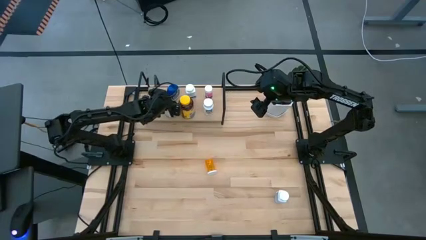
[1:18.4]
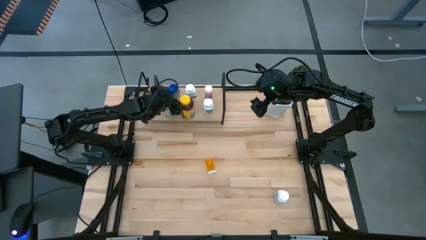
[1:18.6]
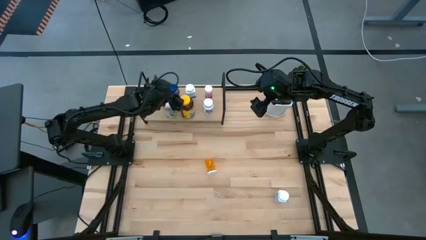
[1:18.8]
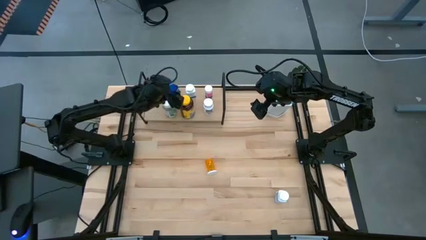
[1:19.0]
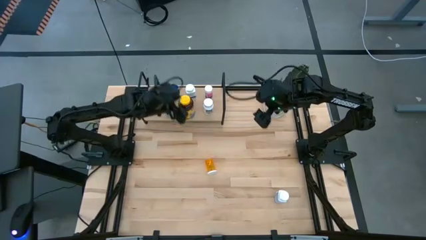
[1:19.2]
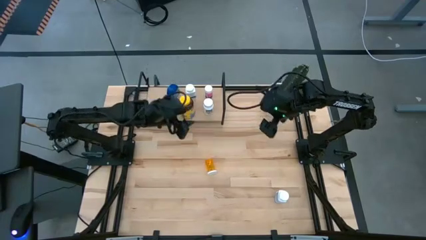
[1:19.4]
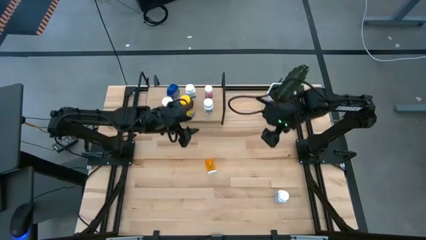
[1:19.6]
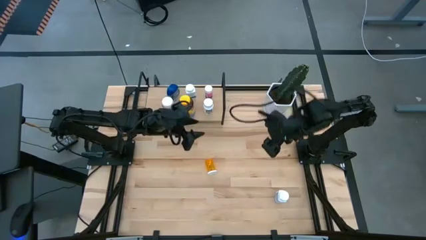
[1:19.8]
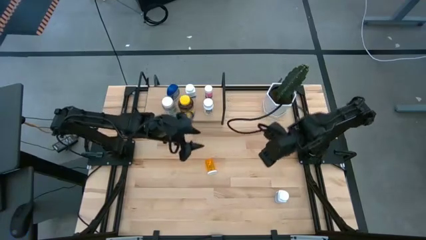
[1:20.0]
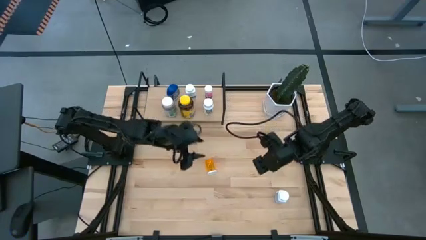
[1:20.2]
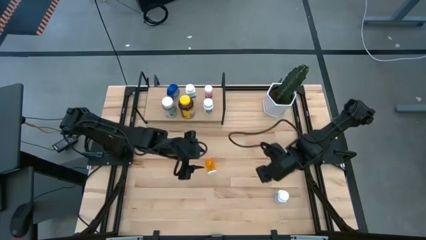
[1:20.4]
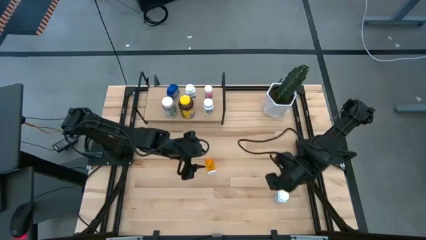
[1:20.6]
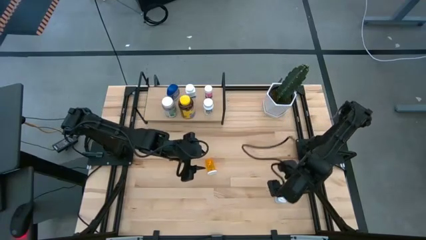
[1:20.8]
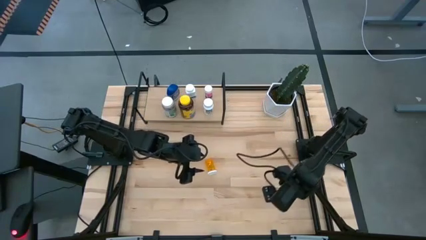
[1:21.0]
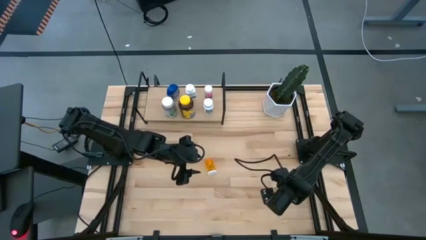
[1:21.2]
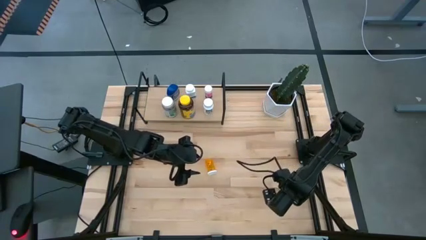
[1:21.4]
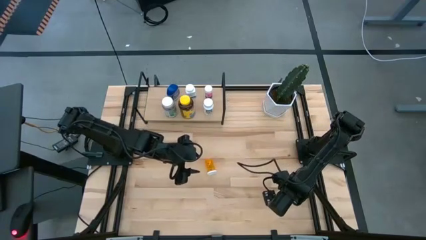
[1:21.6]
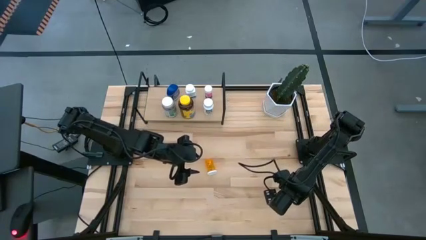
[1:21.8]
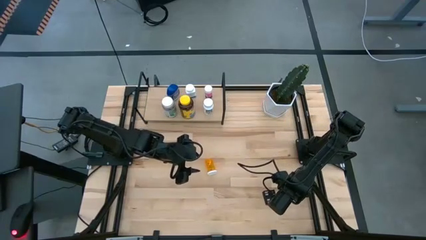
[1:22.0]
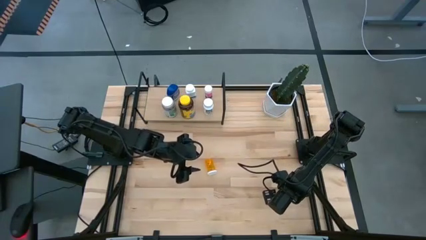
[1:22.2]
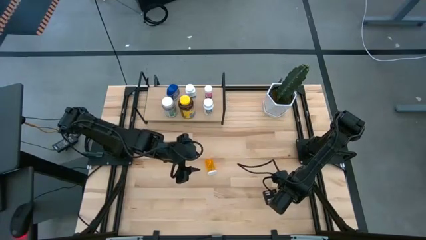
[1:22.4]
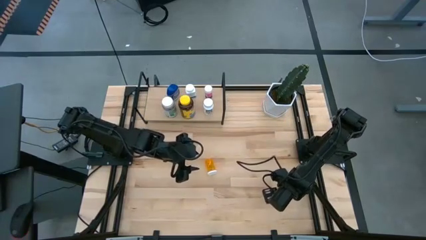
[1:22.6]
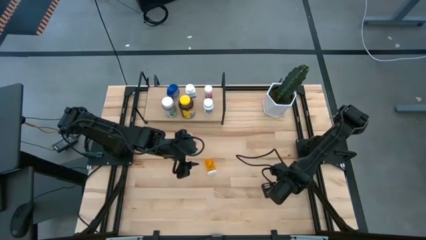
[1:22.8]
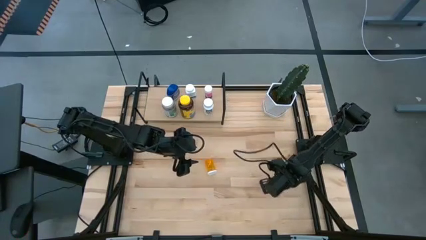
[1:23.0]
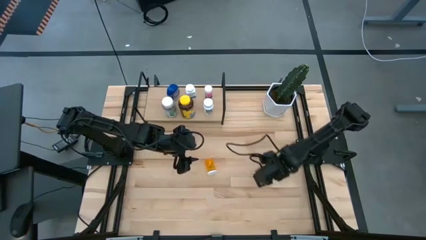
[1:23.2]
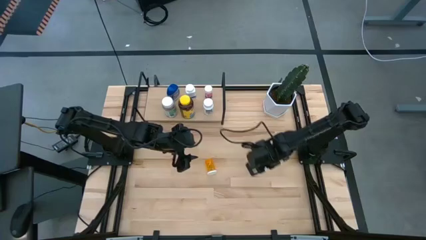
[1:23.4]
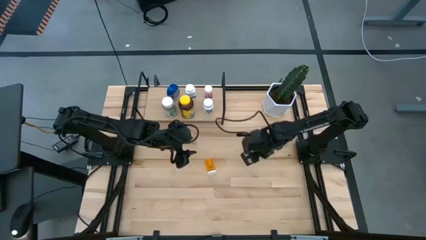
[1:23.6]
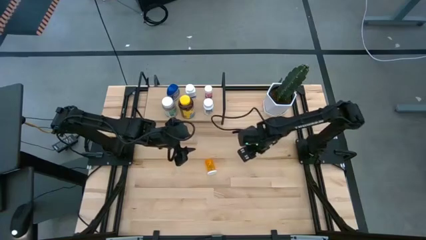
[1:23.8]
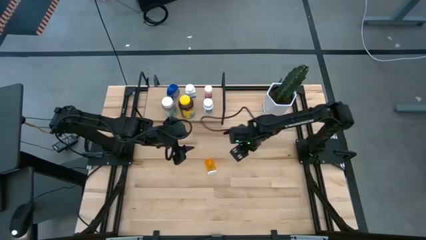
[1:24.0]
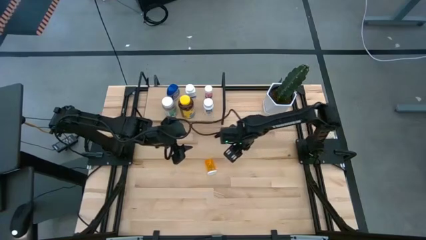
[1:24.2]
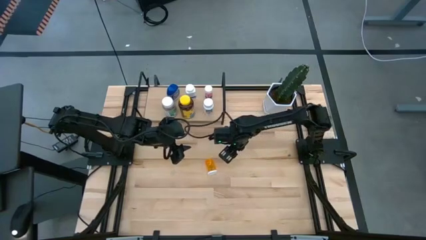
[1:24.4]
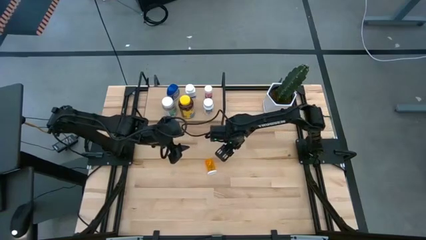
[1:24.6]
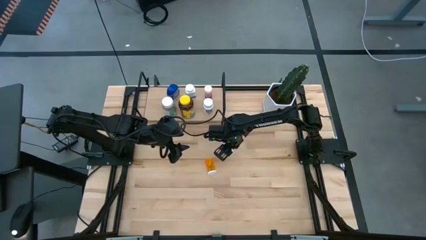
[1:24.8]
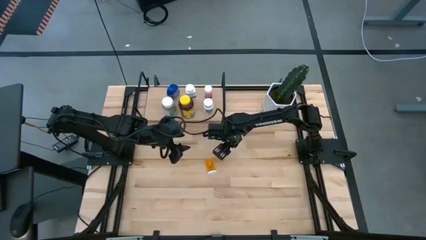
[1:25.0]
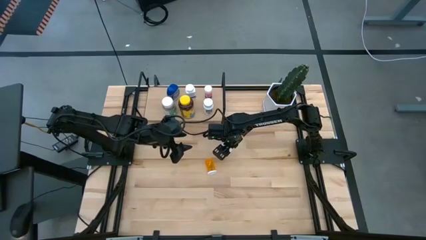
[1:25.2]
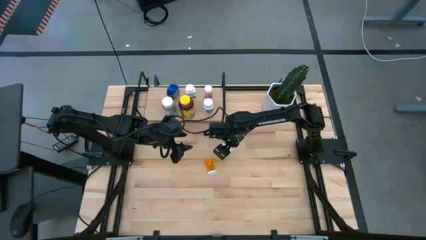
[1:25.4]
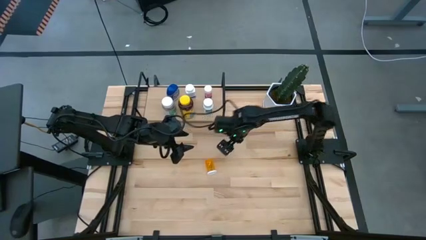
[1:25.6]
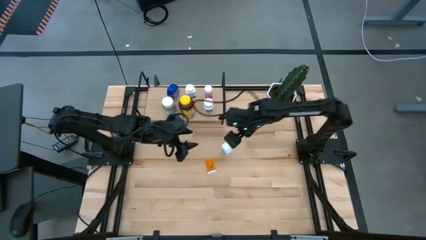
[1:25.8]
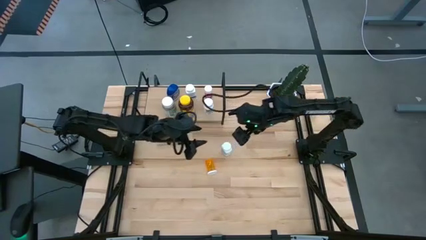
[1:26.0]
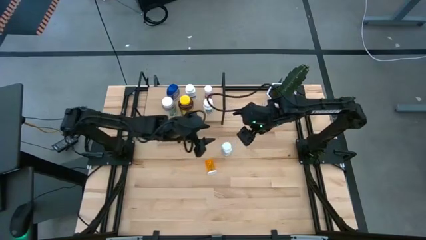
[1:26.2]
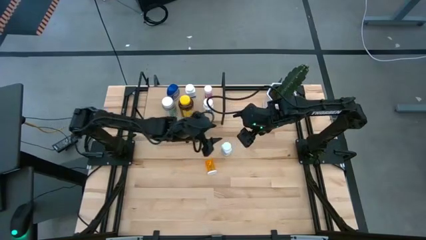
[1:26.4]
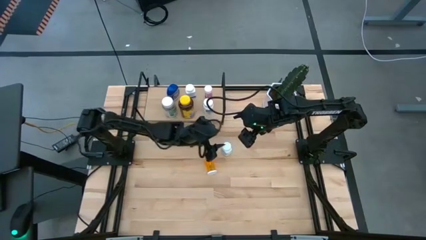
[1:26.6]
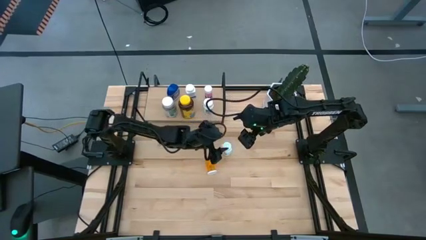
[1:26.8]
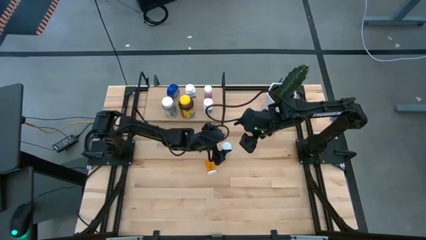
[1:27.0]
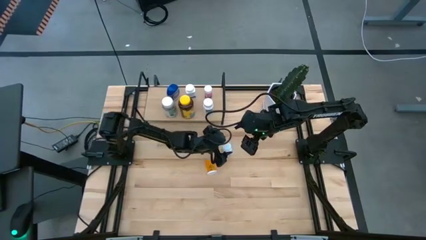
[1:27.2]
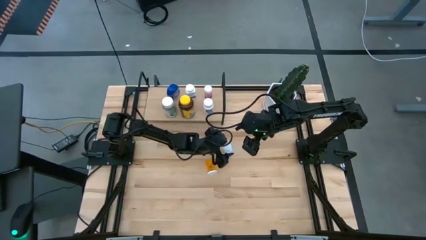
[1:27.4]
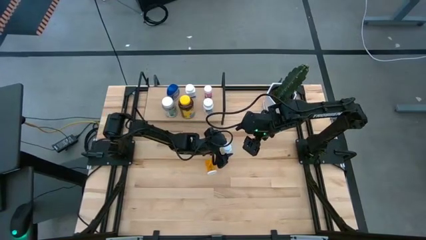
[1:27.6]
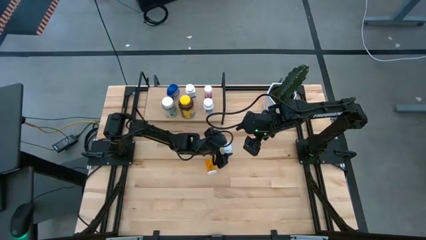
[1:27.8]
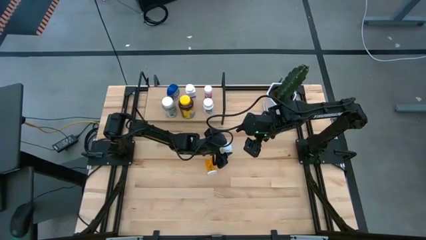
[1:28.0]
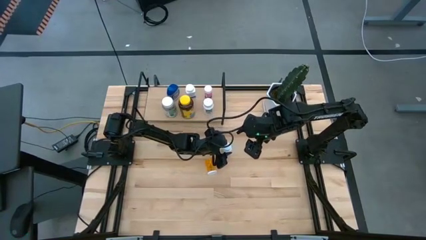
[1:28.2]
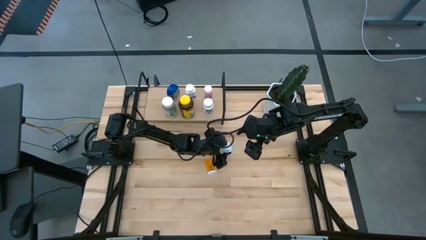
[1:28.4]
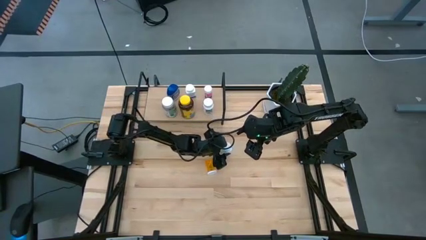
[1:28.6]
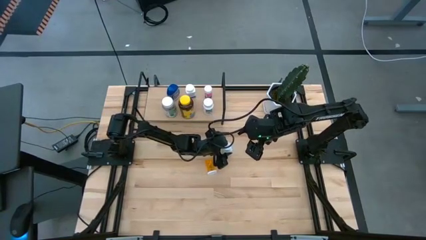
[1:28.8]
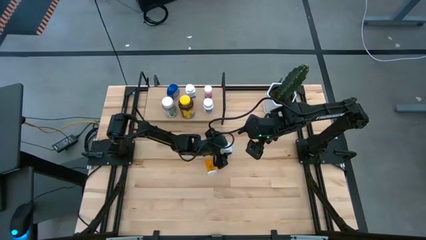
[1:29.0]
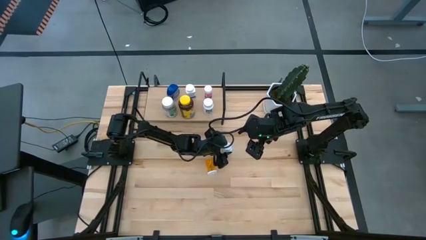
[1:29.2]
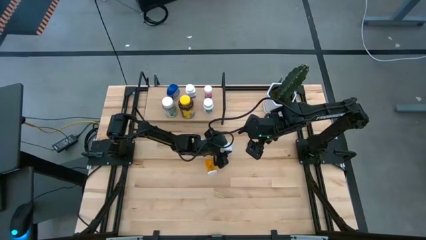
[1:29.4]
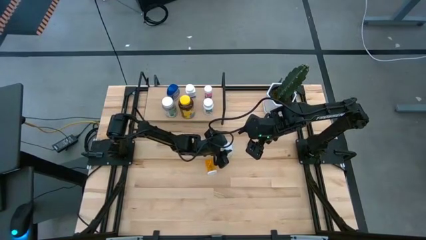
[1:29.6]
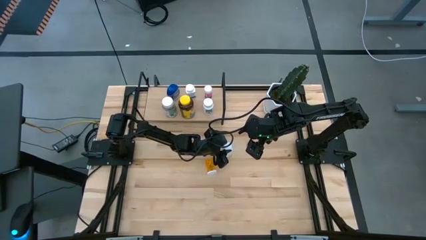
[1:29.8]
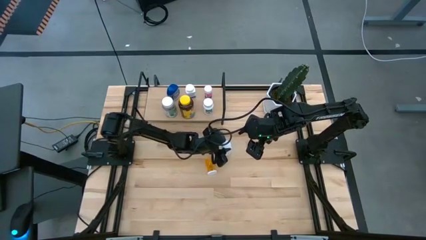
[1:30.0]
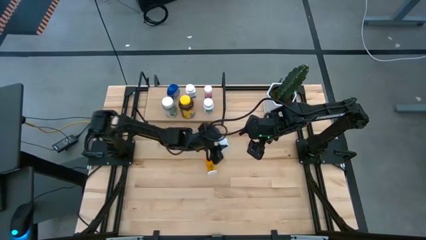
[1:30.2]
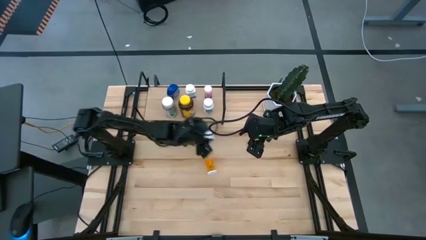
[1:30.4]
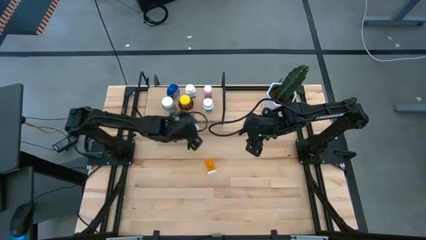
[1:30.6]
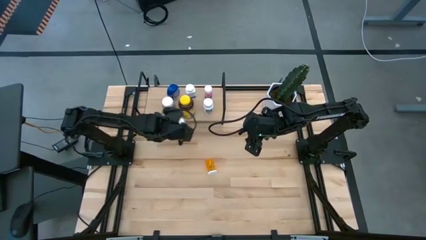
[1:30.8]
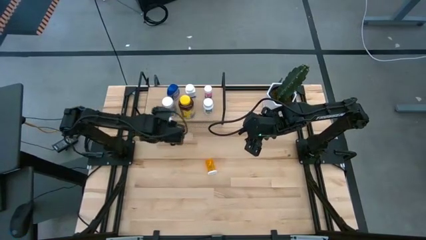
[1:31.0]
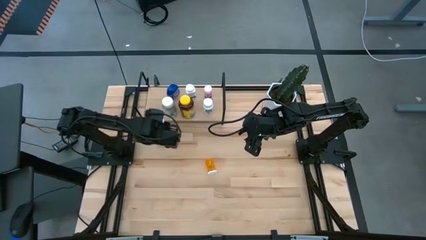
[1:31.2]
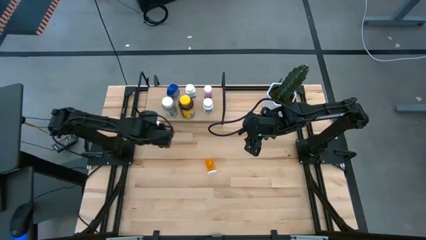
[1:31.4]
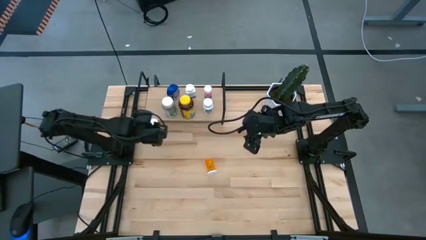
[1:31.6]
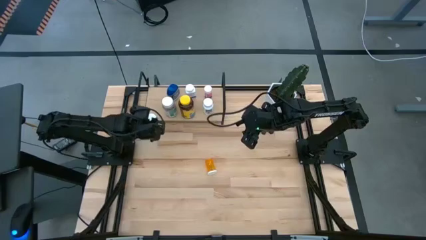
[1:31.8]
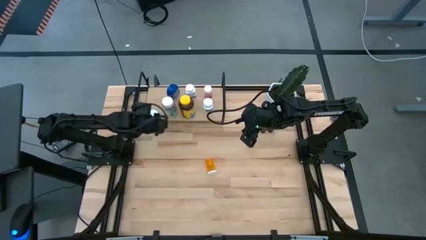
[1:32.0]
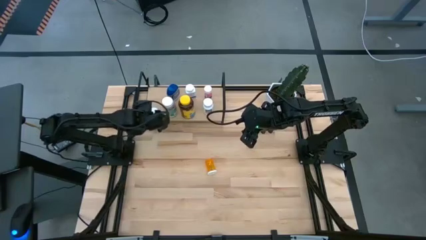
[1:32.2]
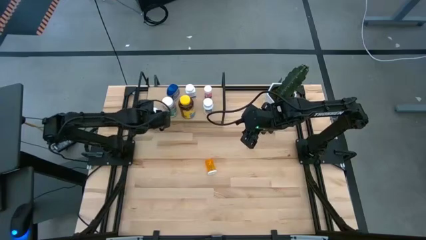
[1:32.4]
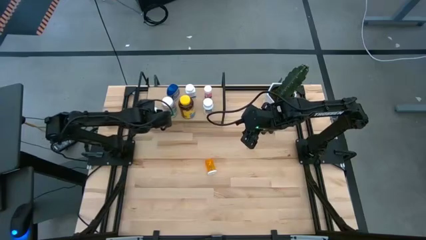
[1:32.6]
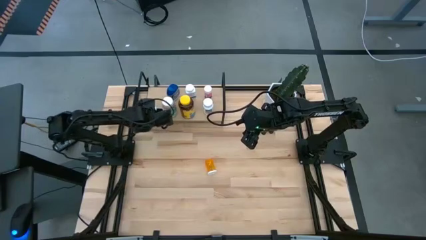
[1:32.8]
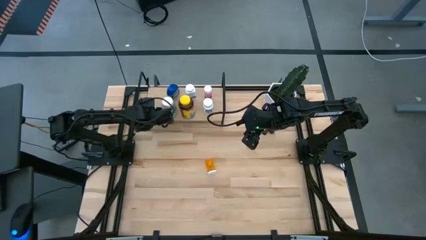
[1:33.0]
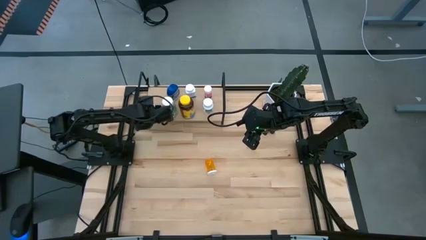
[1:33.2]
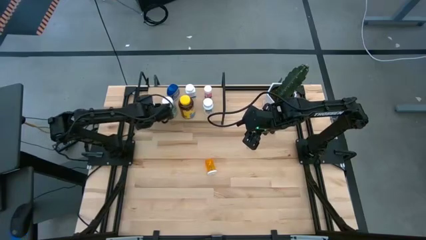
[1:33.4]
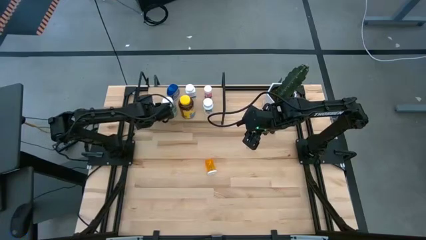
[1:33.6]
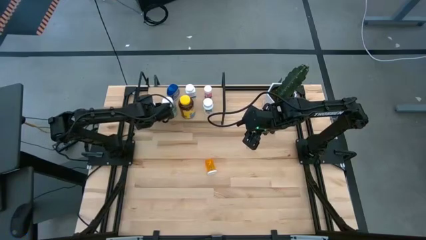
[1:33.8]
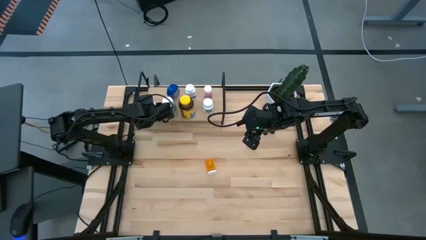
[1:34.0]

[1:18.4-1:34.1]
Task: Pick and place medicine bottles onto shelf by color
Put the white pill bottle on the shelf

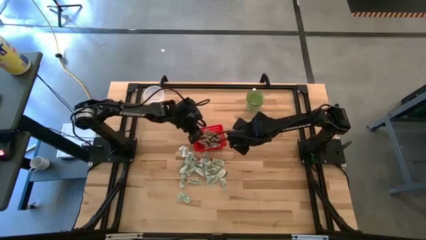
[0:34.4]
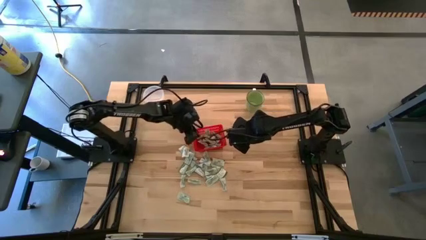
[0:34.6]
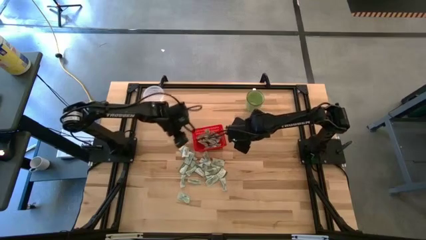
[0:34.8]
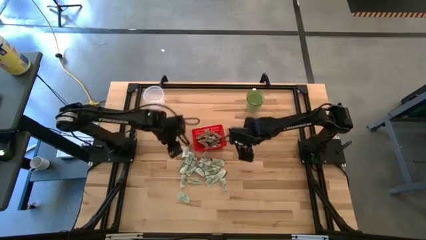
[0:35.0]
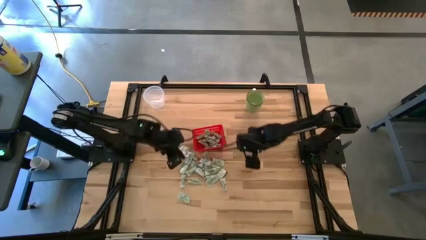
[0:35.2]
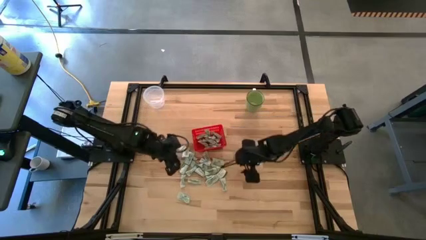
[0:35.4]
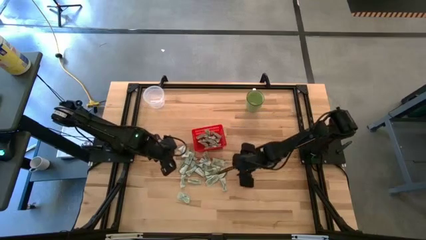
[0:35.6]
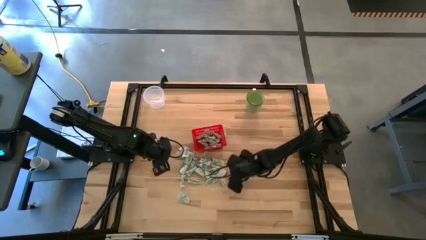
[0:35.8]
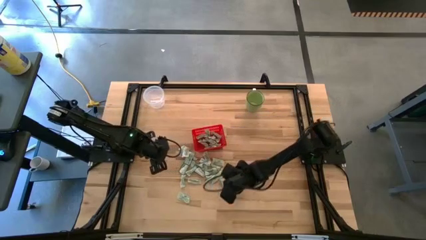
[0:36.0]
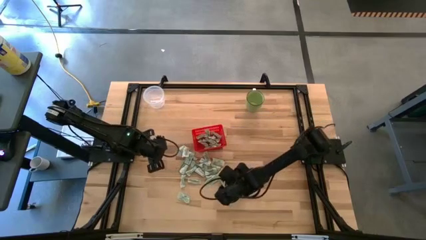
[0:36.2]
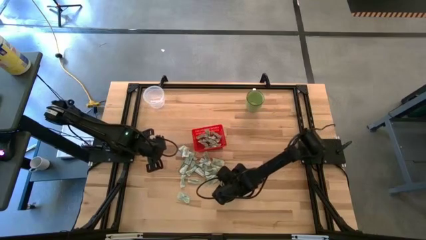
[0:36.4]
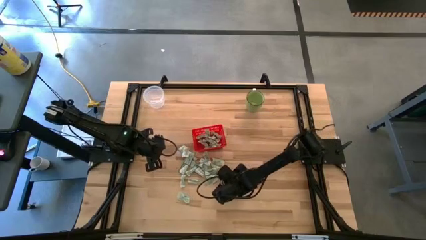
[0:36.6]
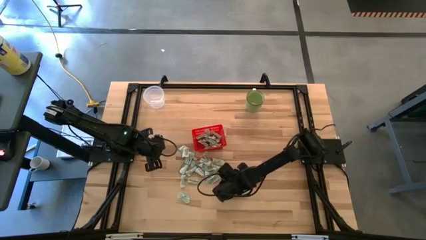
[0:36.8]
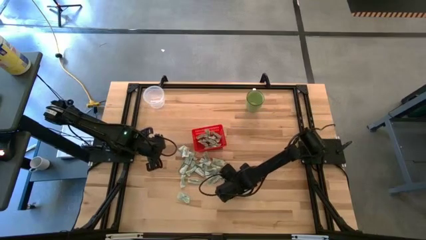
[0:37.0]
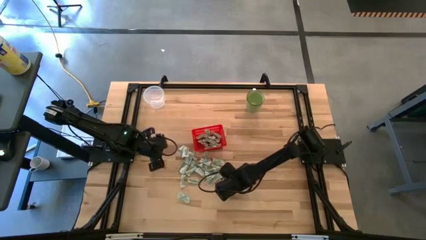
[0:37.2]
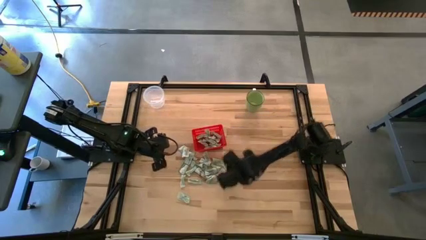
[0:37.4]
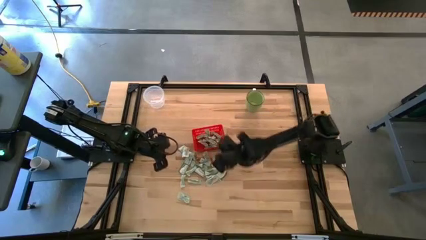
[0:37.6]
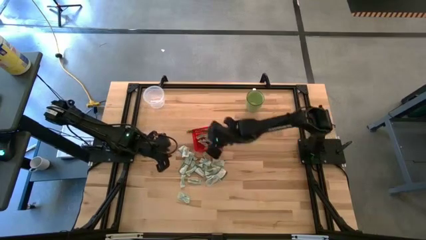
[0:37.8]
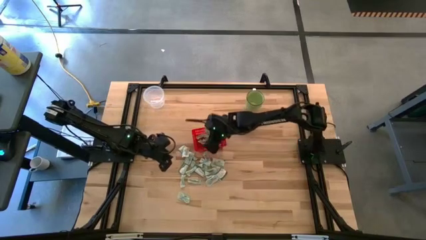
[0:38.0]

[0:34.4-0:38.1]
Task: Pick and place Stevia / Truvia into bins
Put the stevia packet into the red basket
